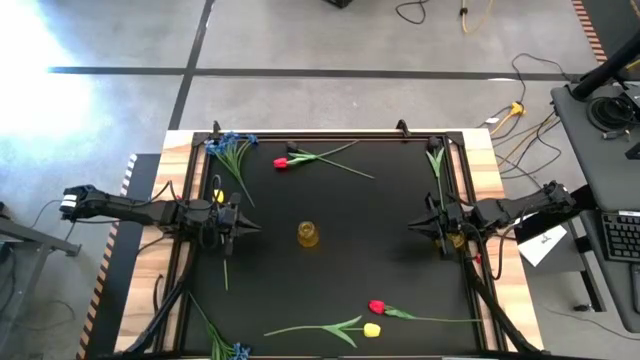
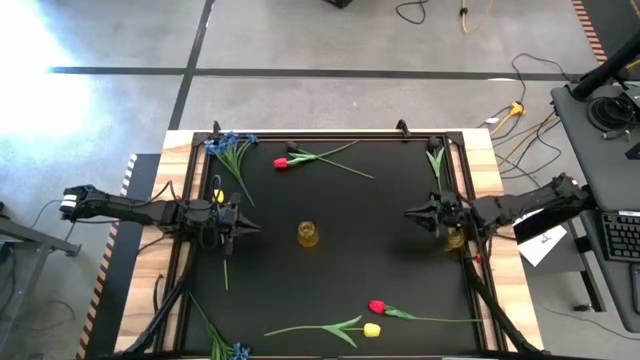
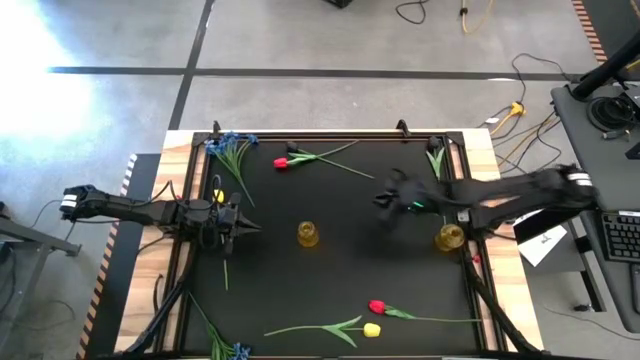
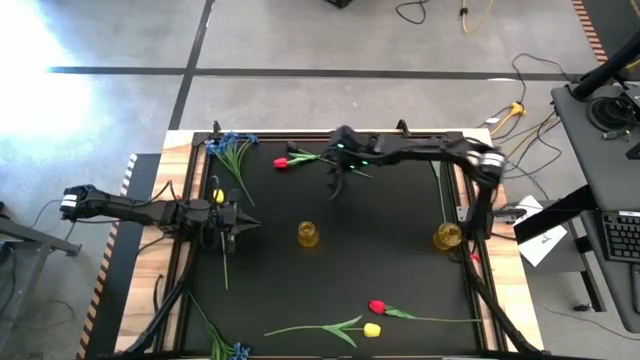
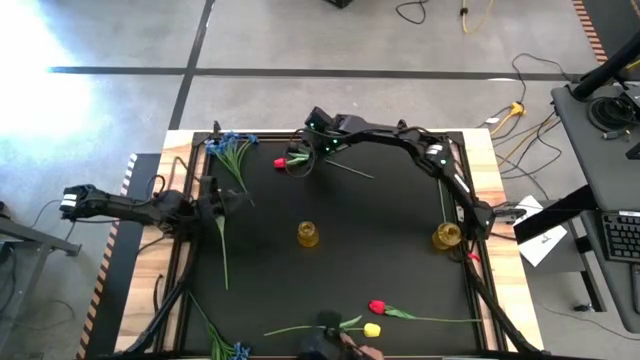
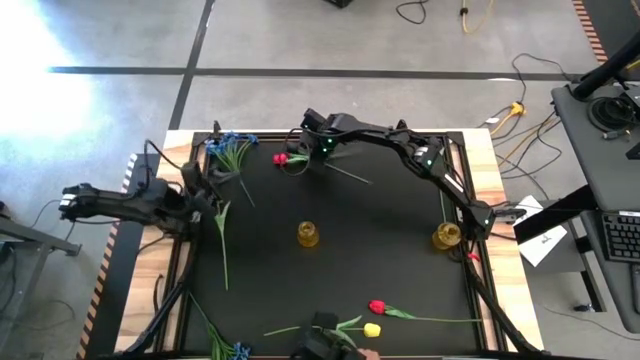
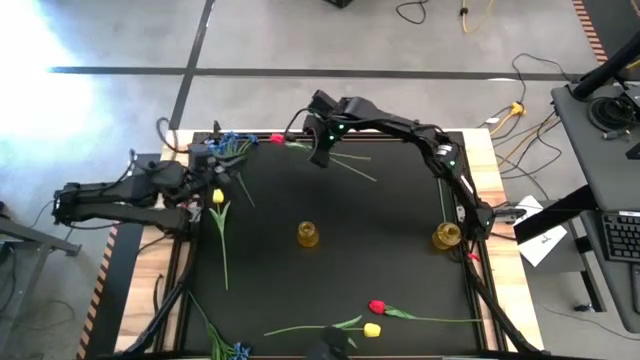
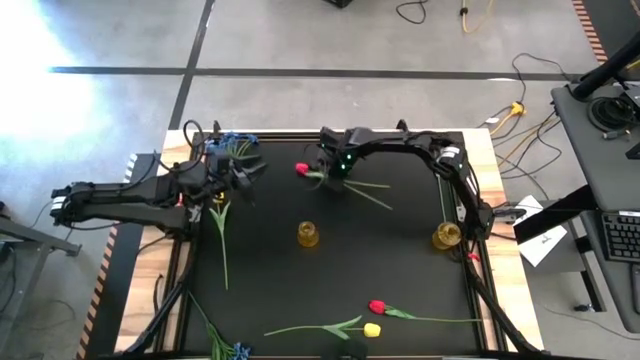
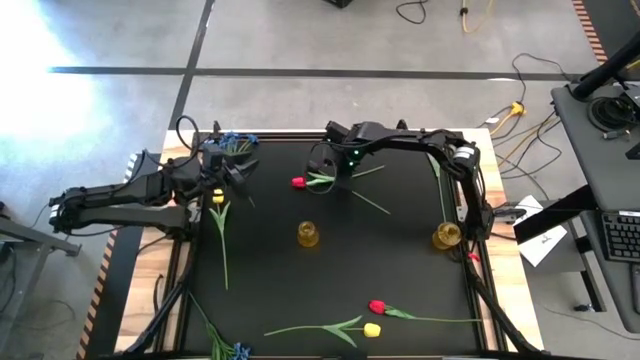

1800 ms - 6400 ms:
Task: Sort flowers into vase by color
Put the top red flower into the left yellow vase

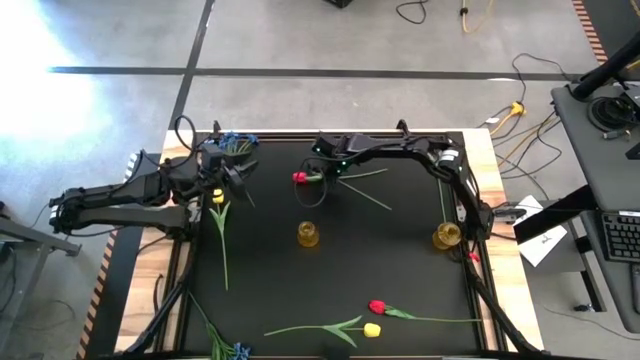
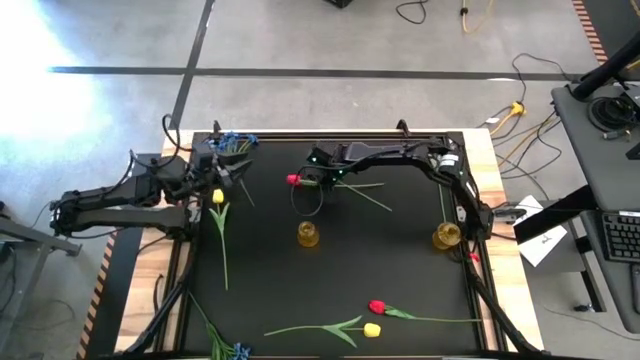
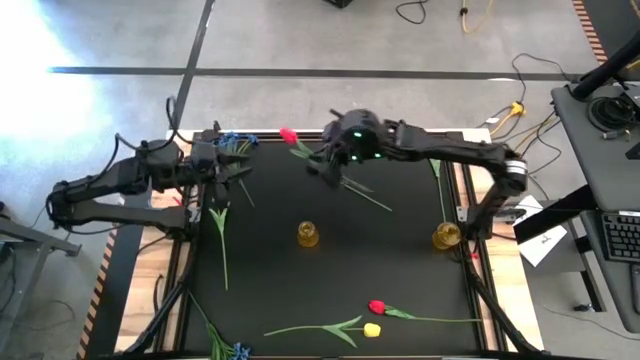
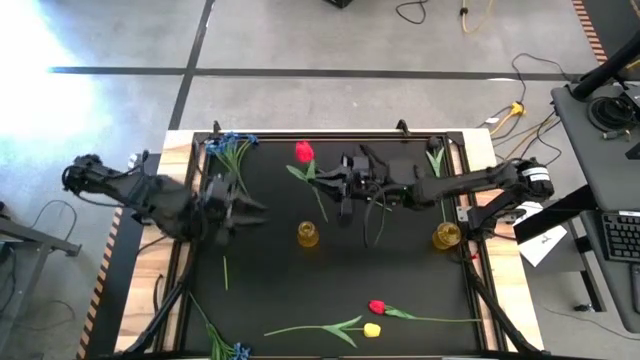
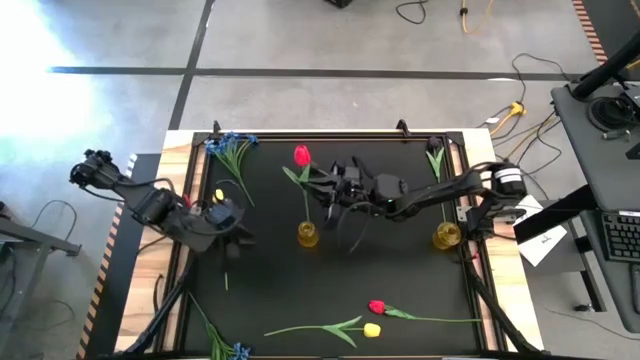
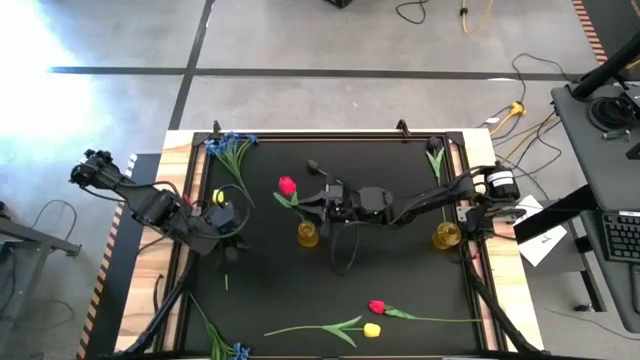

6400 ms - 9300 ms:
Put the top red flower into the left yellow vase

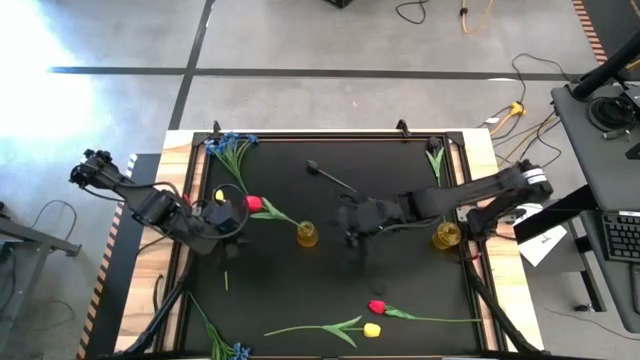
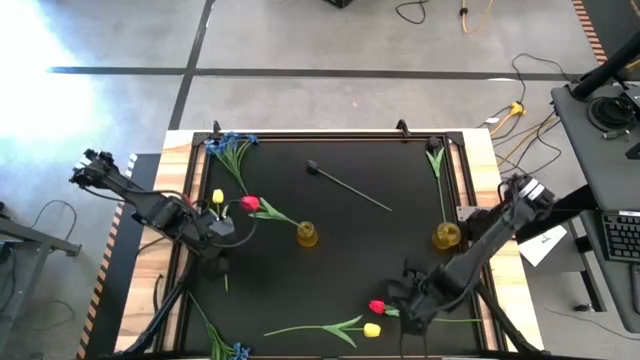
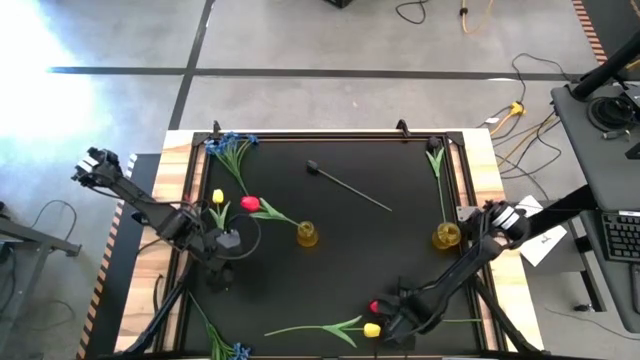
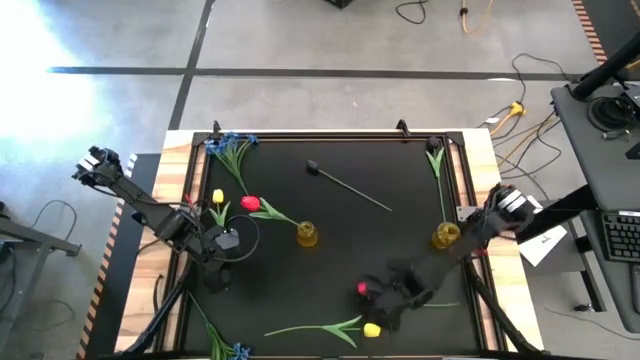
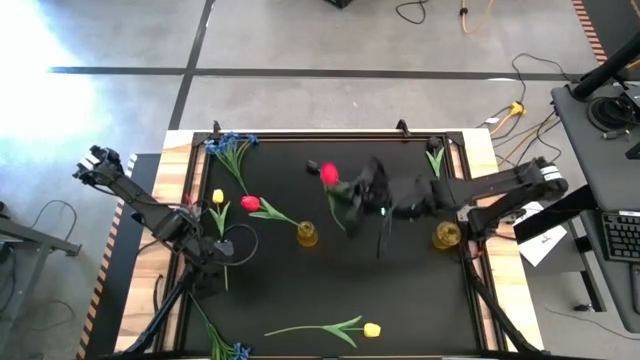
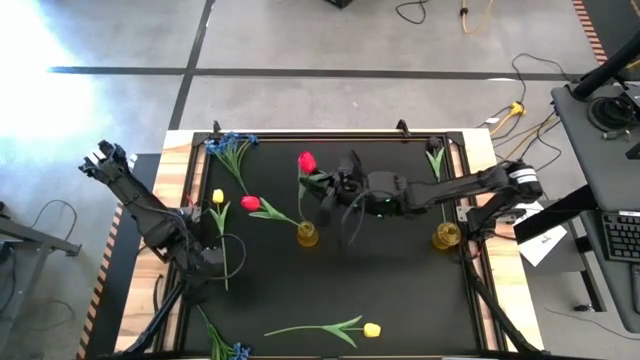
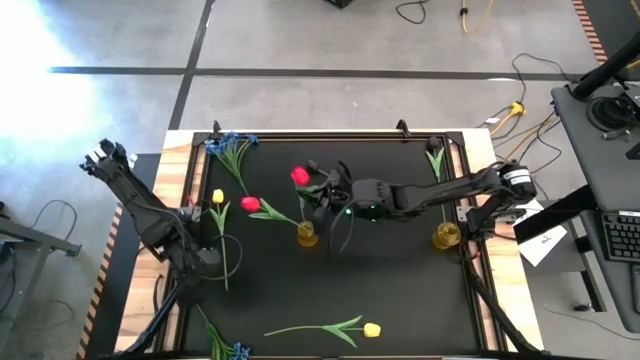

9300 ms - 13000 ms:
Put the red flower into the left yellow vase

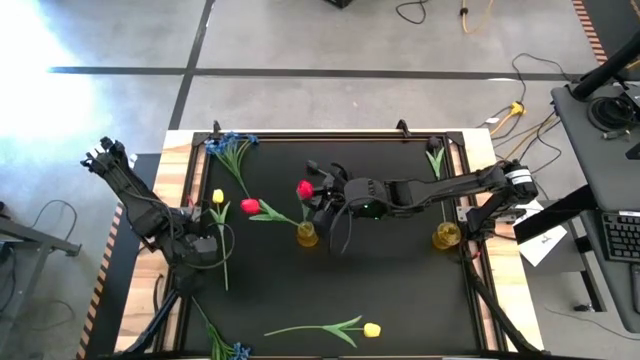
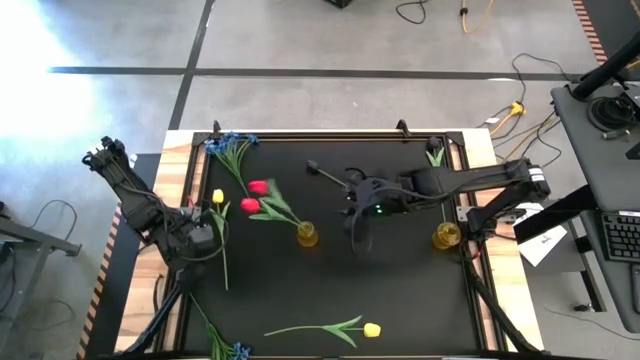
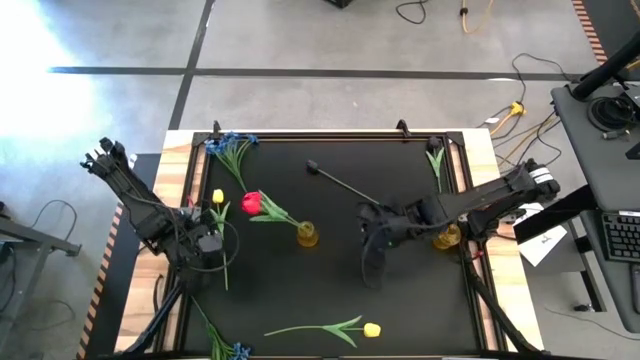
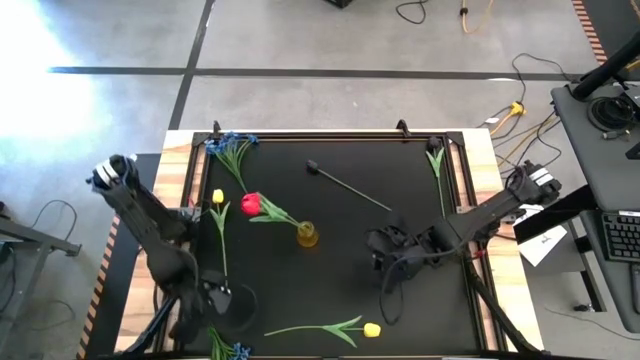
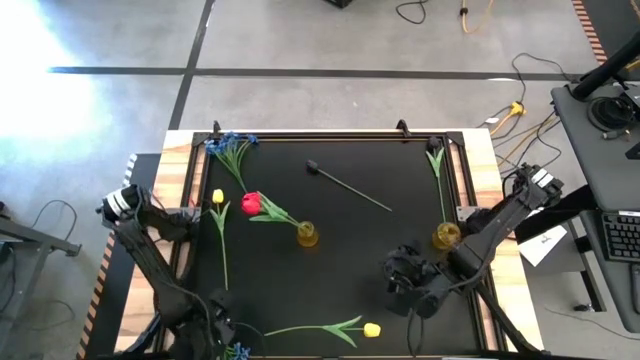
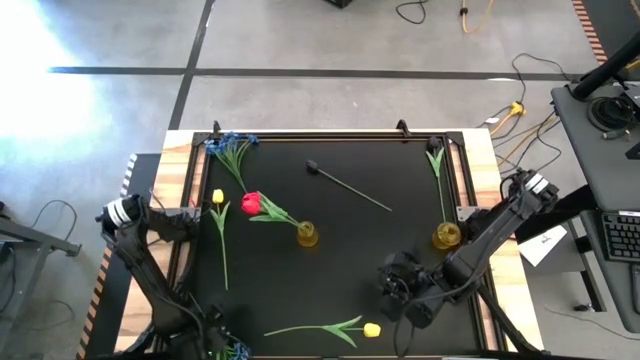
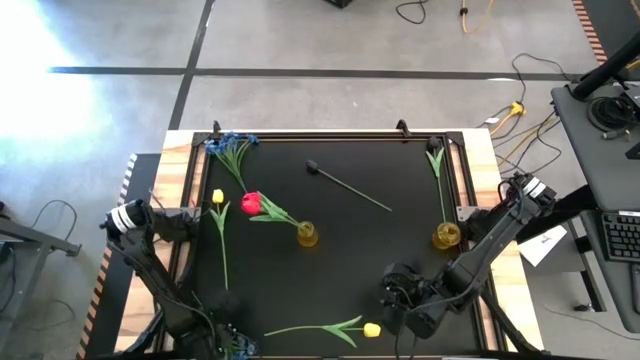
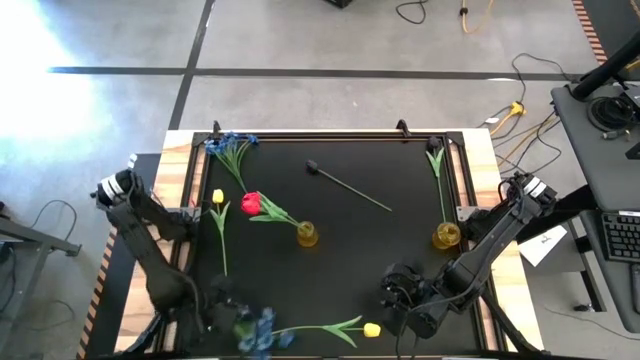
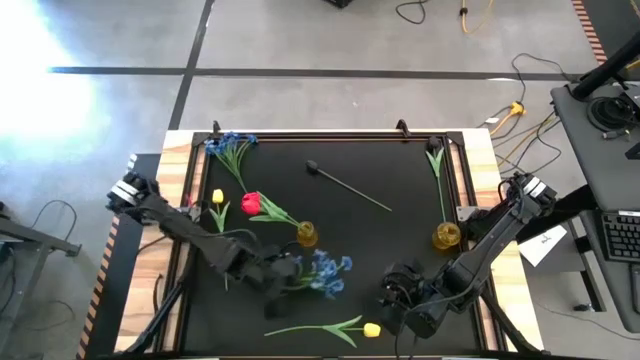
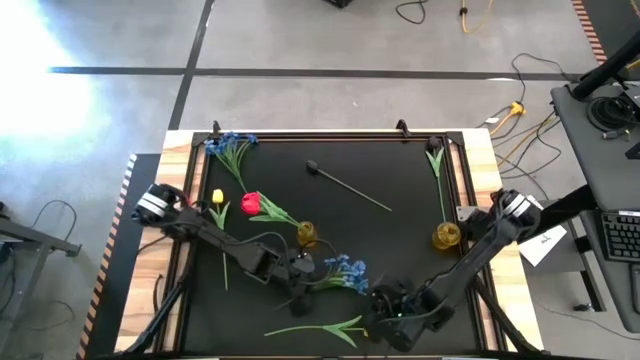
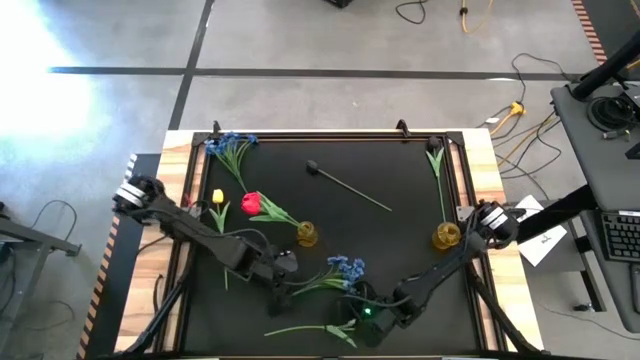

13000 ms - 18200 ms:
Prepare the bottom blue flowers

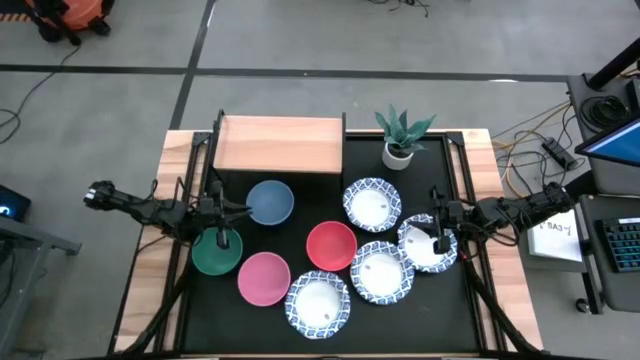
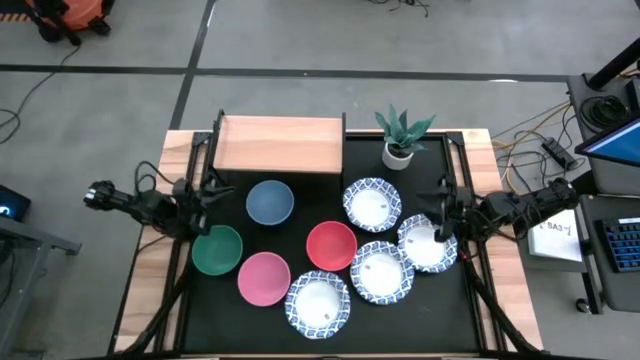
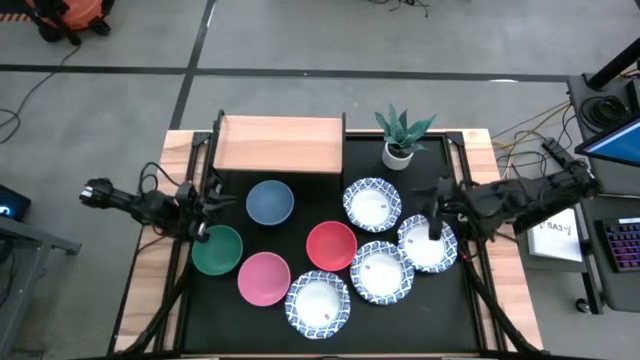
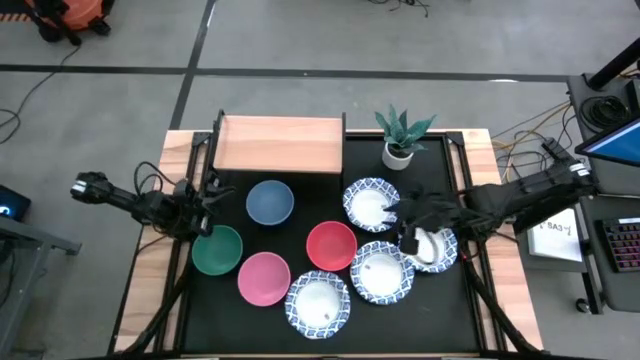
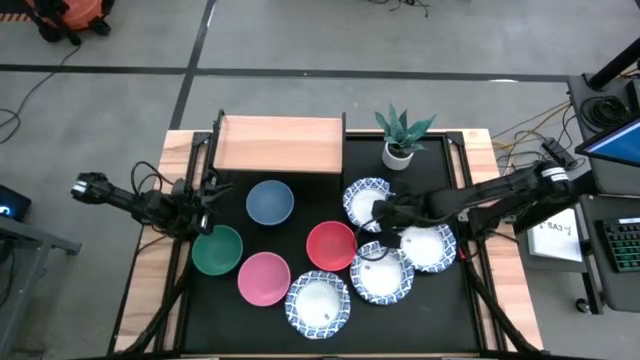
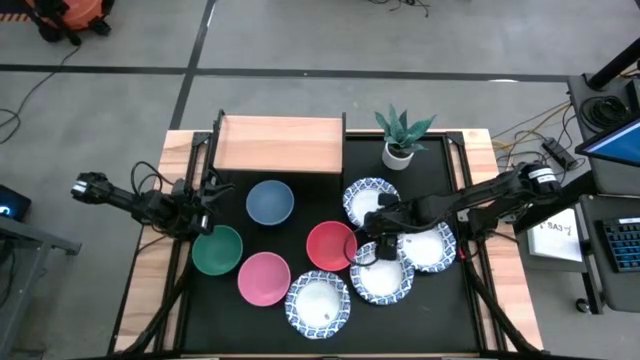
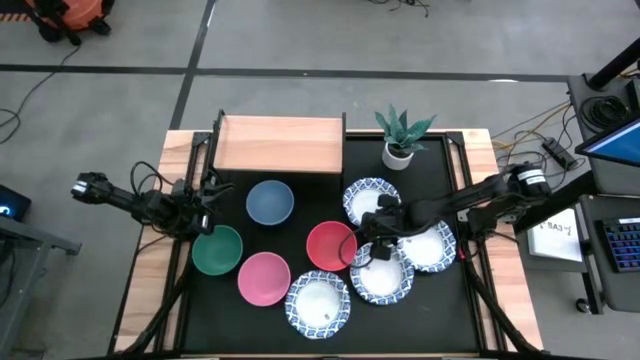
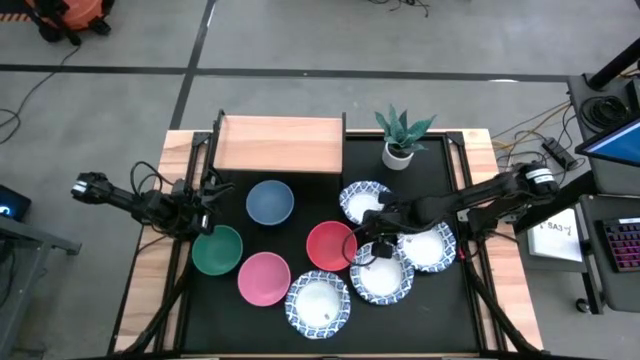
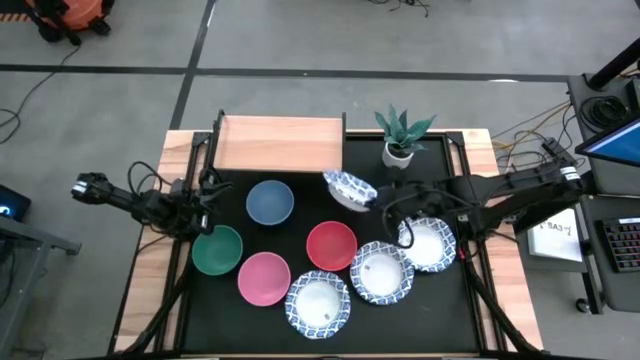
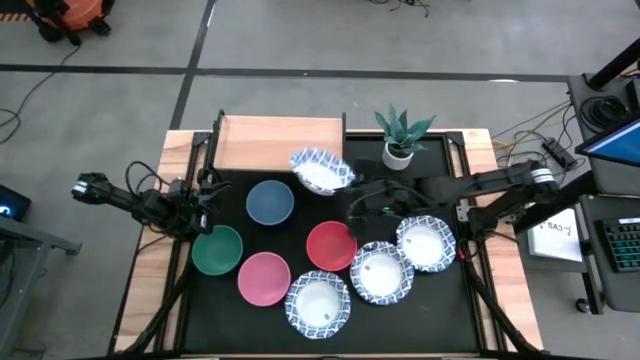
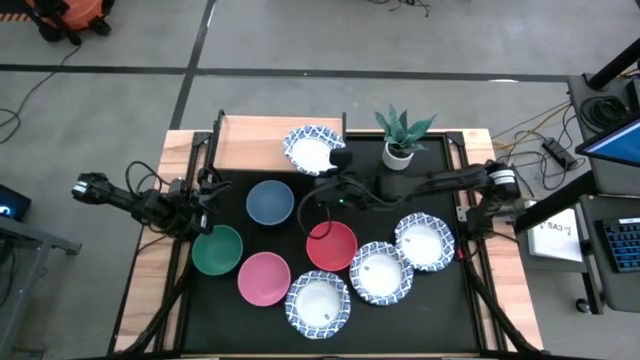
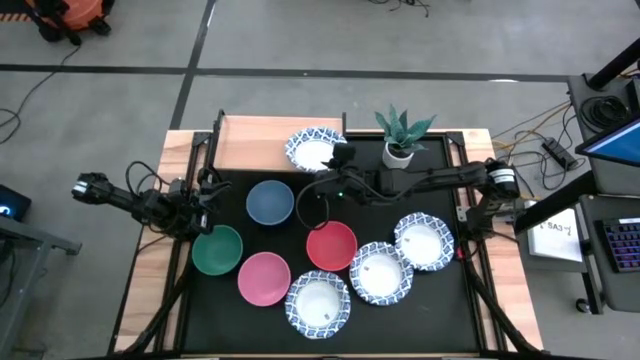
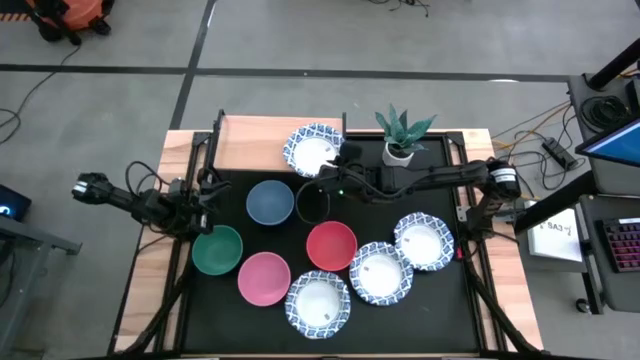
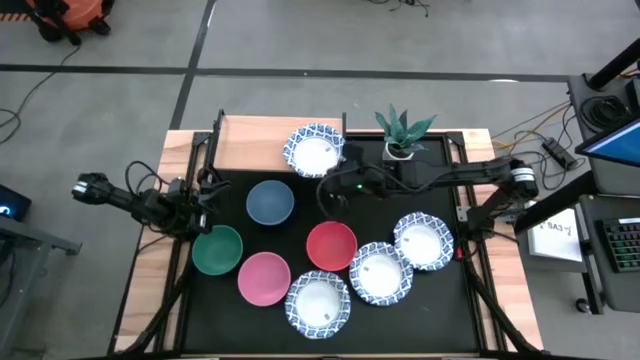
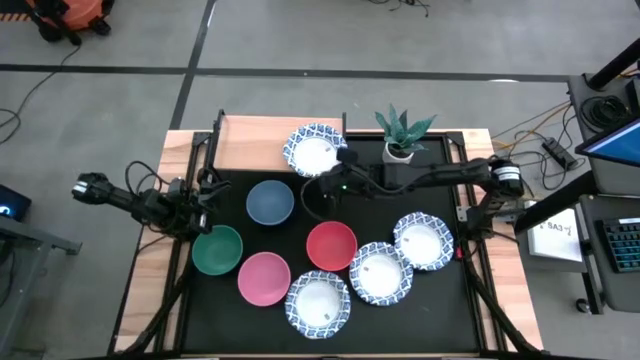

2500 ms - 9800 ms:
Task: Place and stack bowls onto a shelf
Put the top white patterned bowl on the shelf
